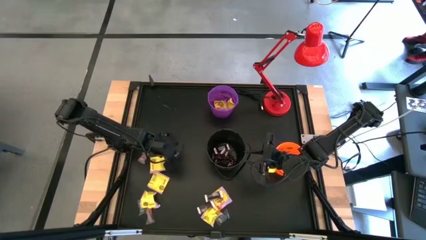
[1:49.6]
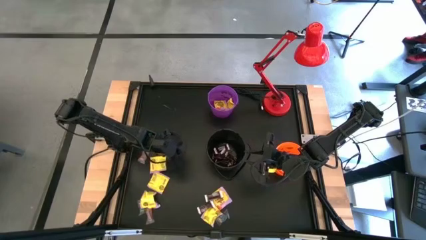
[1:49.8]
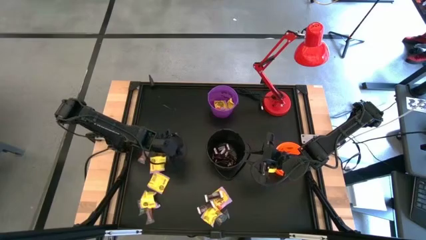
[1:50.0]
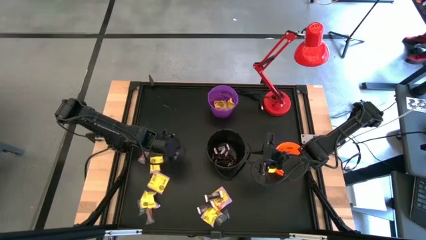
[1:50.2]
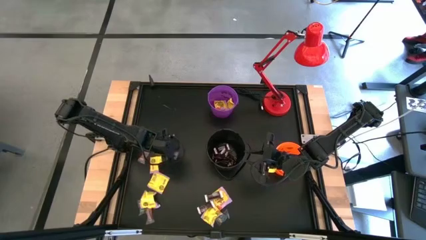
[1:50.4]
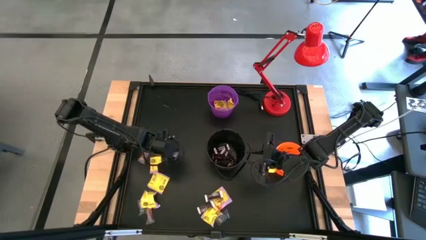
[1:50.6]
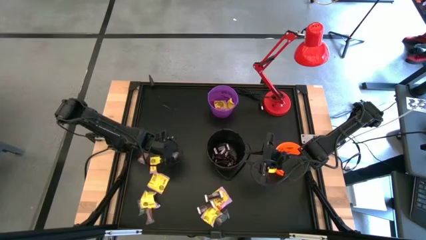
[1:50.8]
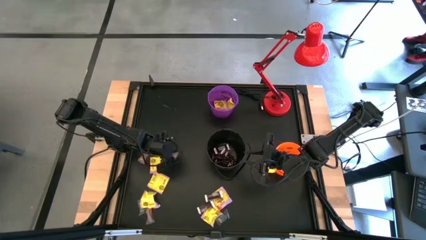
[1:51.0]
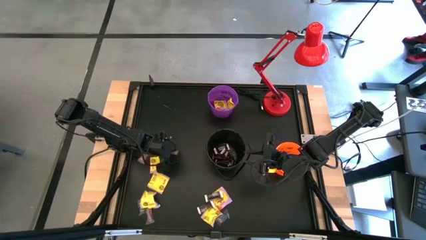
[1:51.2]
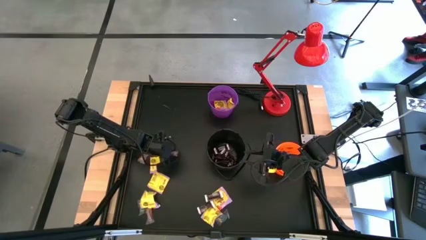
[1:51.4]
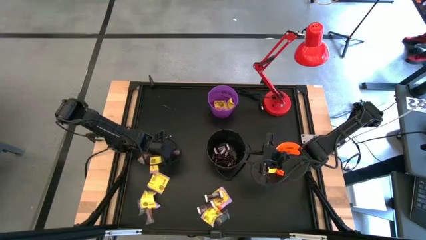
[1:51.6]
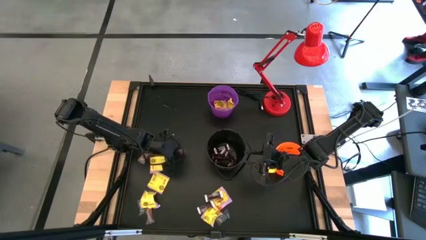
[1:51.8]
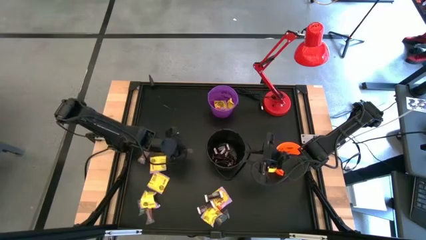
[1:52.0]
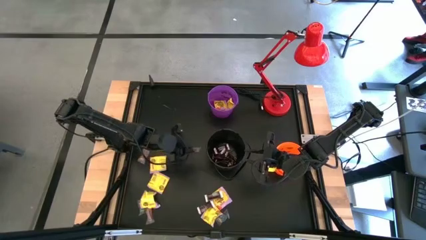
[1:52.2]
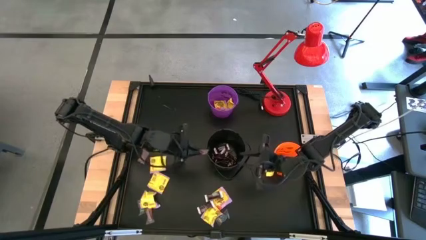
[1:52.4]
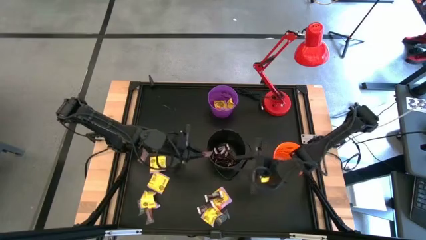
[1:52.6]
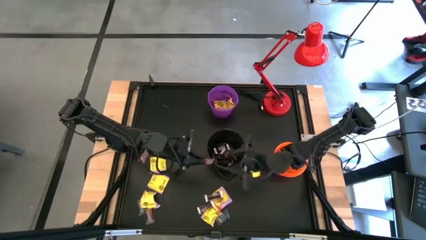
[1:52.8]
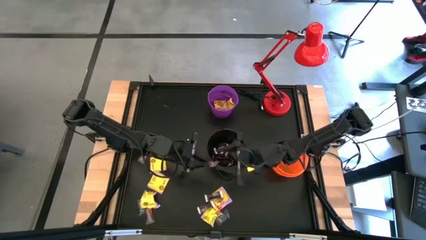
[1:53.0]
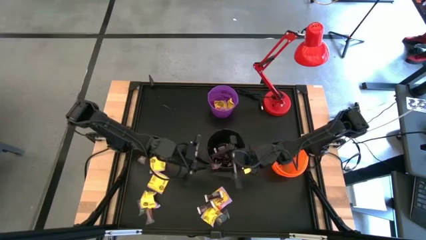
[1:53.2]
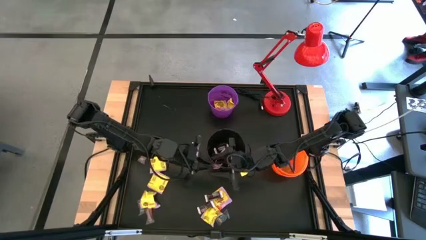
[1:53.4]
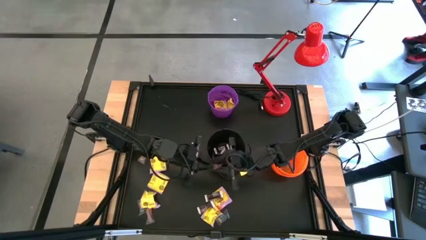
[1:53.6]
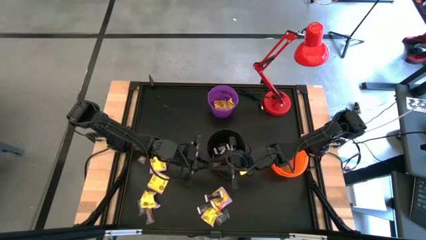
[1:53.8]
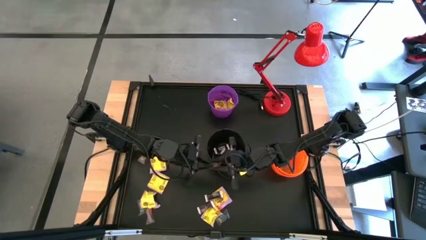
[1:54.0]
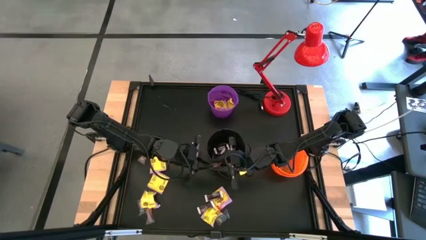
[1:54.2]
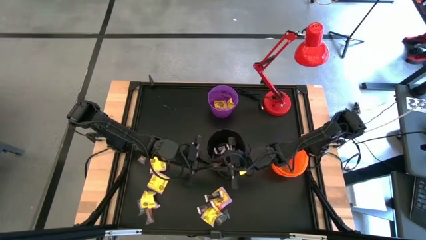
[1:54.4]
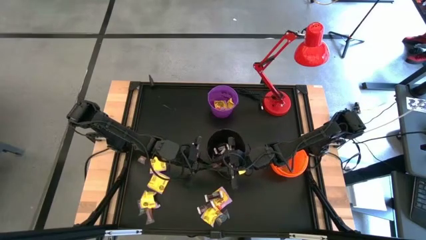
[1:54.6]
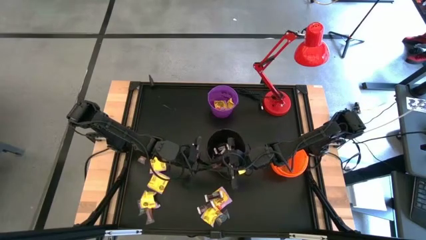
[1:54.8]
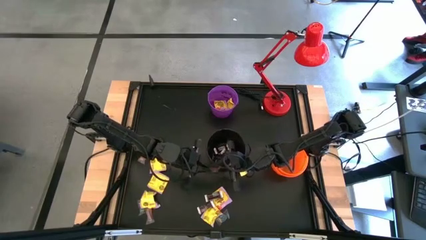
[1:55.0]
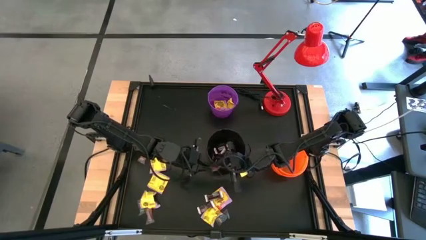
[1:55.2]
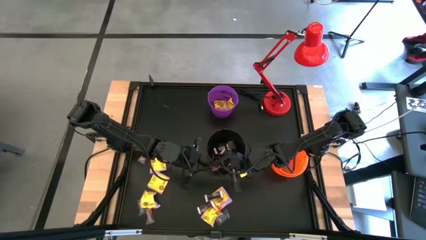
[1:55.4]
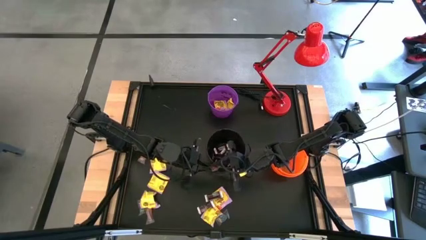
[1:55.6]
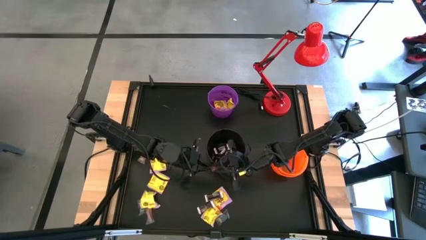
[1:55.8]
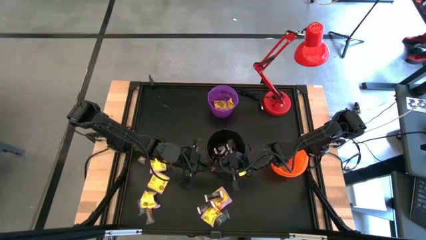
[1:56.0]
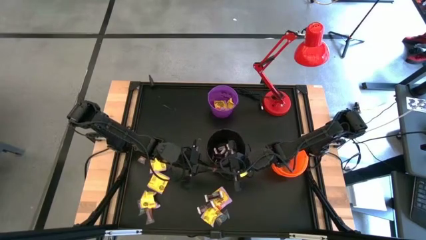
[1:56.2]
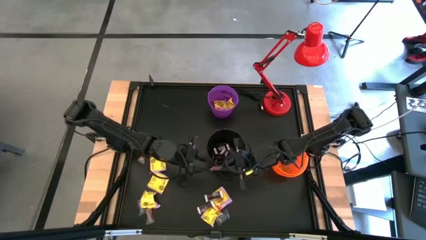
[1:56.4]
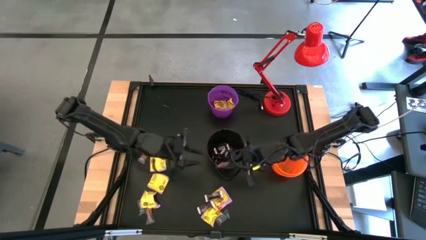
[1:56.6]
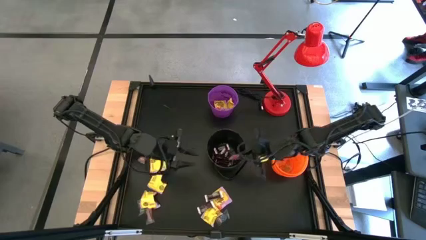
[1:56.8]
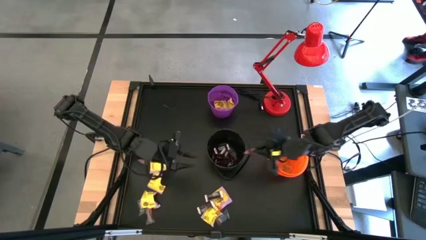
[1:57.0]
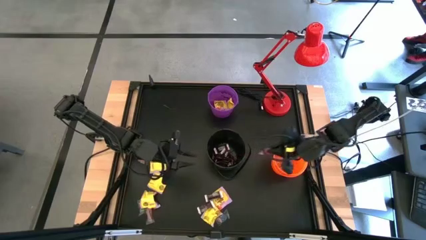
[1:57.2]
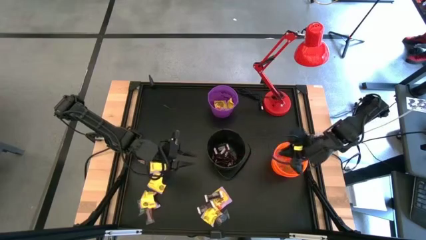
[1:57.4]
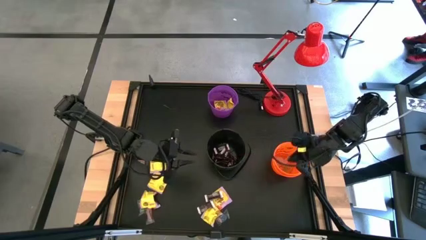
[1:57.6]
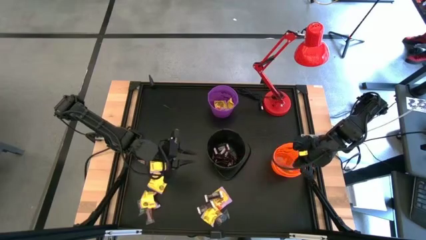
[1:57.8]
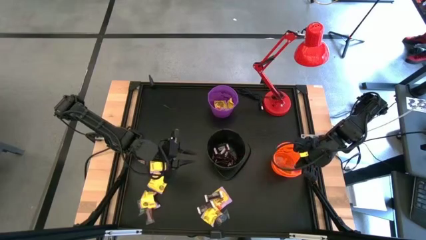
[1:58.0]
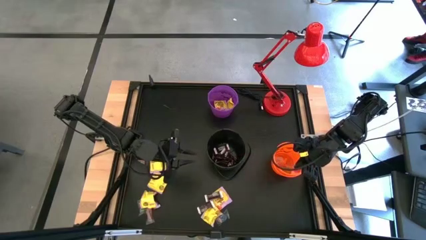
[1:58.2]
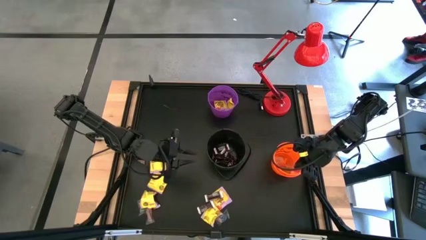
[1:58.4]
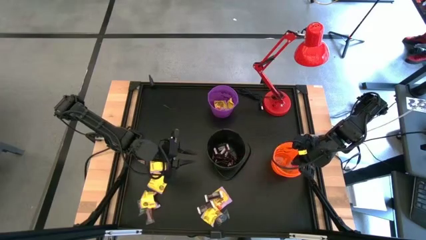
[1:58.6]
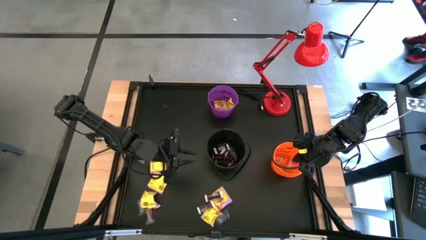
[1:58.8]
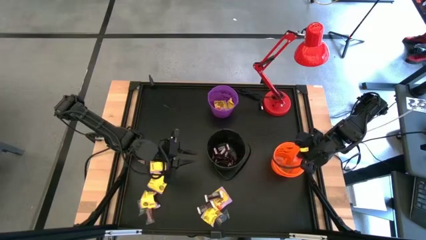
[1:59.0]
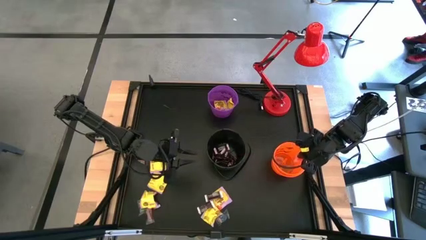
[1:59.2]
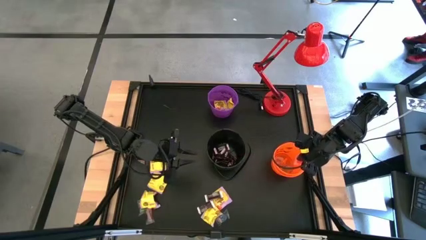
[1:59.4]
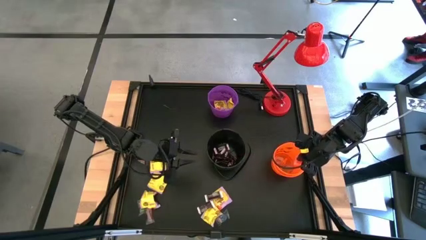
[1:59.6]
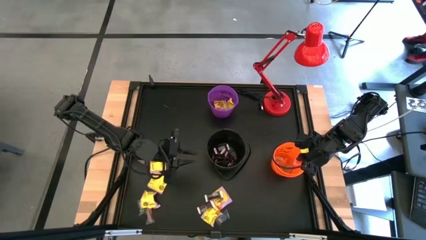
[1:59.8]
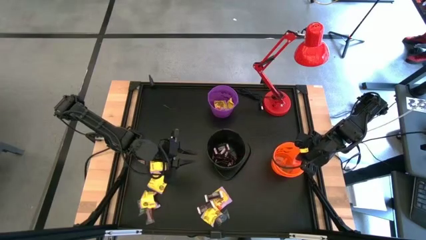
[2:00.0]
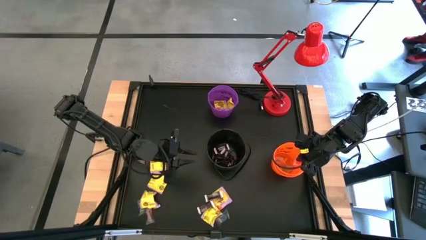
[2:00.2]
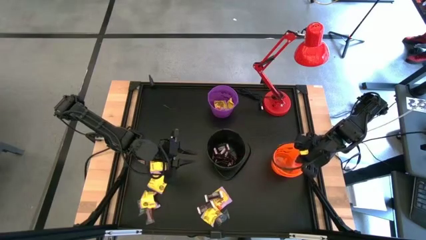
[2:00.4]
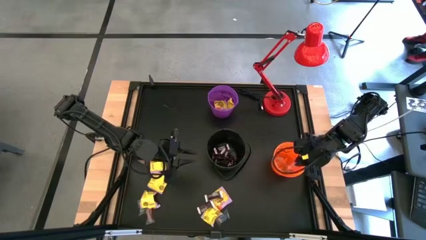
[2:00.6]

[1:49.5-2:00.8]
Task: Sort candy
Put the orange gummy into the orange bucket

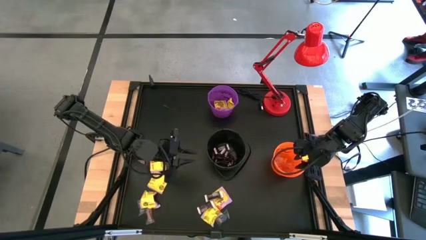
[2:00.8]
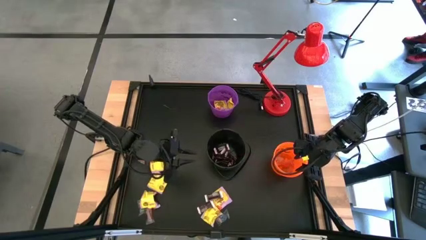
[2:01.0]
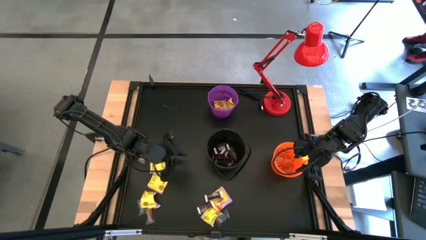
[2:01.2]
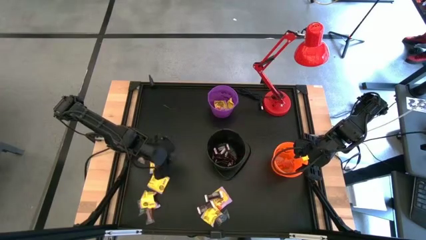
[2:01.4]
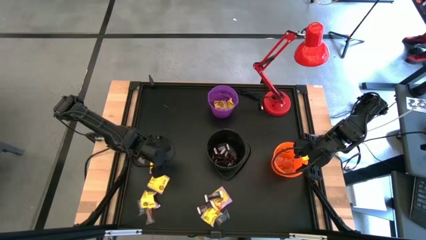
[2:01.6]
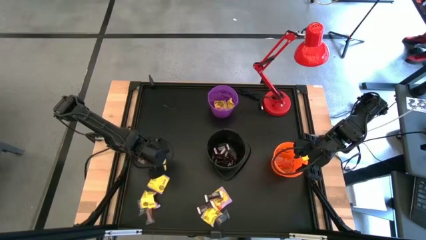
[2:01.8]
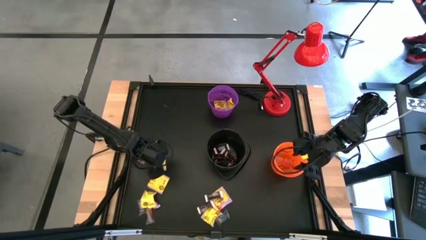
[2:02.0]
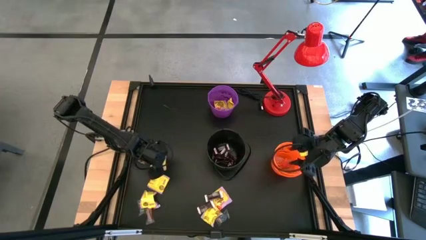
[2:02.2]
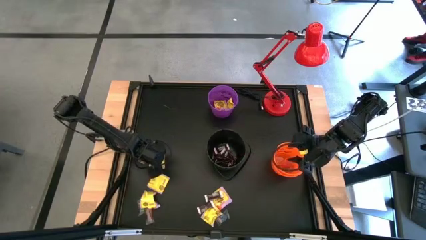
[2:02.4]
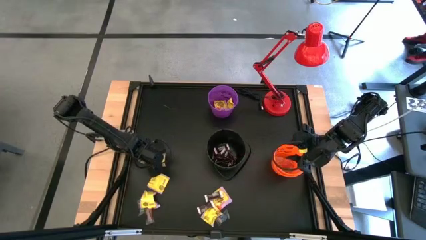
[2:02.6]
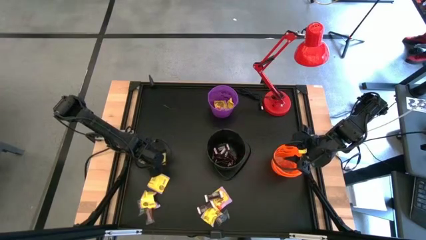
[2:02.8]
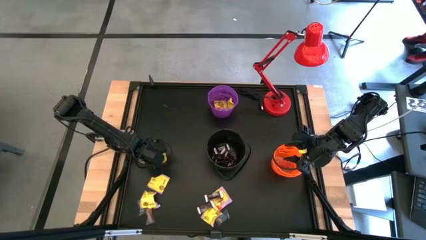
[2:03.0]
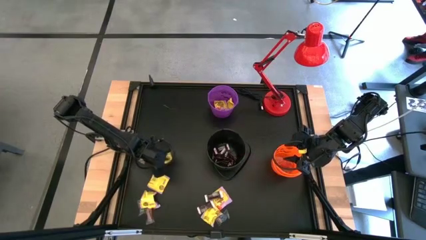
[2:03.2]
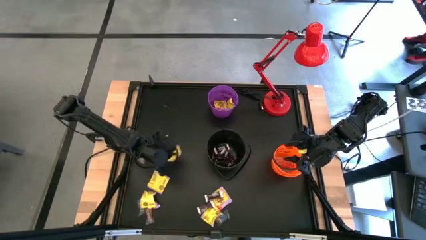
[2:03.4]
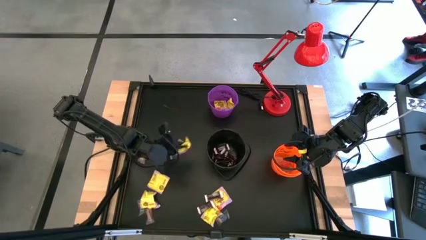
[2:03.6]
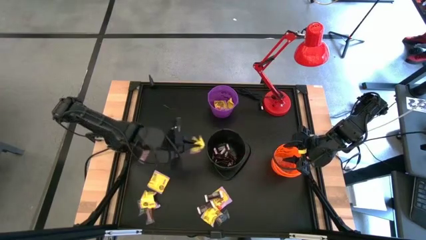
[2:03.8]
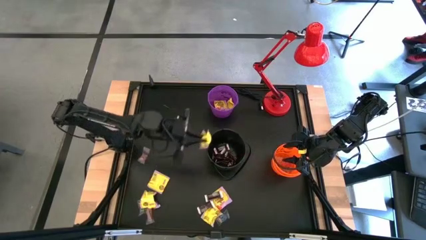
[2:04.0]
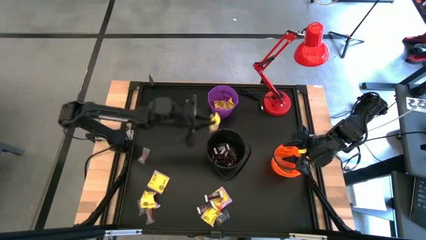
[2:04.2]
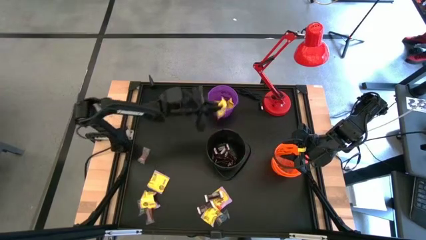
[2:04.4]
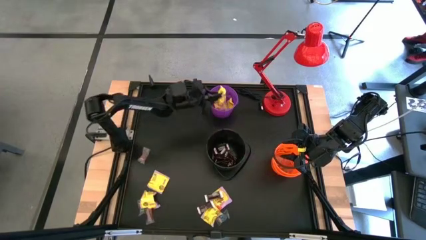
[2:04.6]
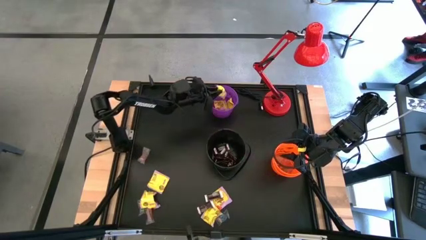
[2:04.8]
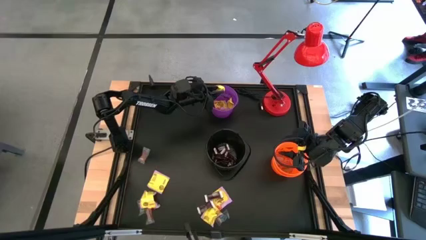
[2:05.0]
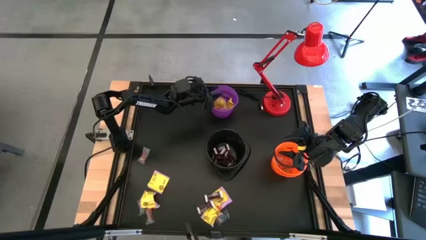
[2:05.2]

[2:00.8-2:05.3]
Put the yellow candy into the purple bucket
